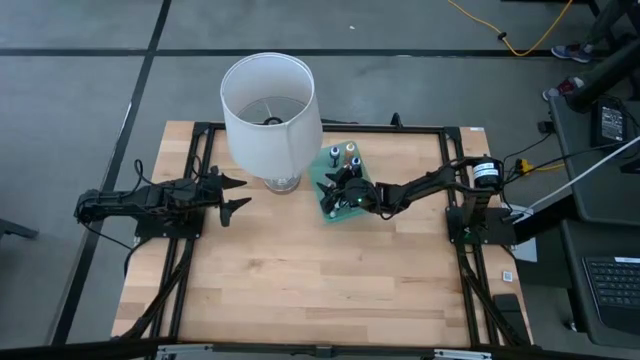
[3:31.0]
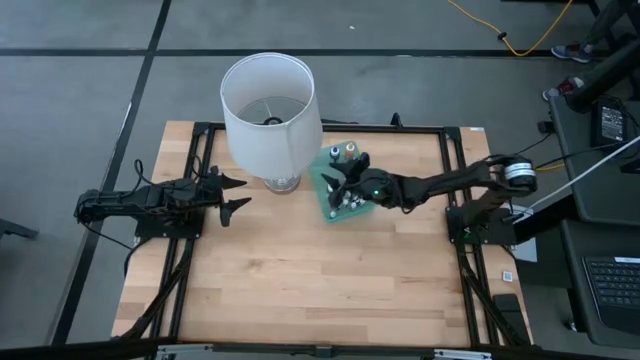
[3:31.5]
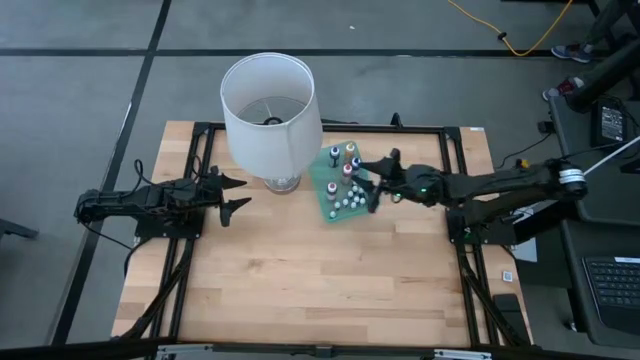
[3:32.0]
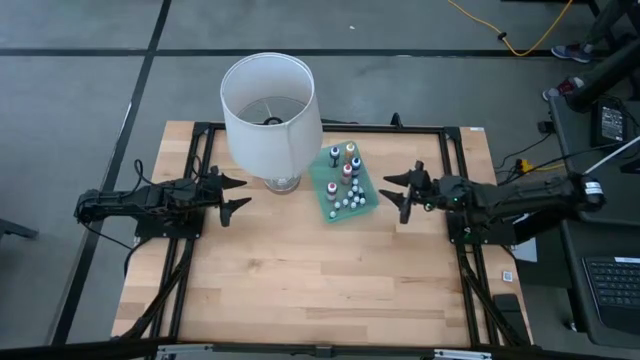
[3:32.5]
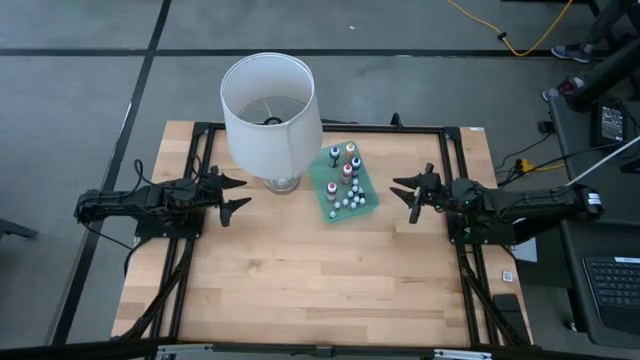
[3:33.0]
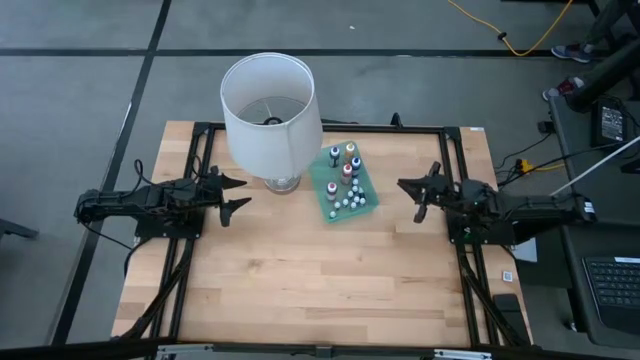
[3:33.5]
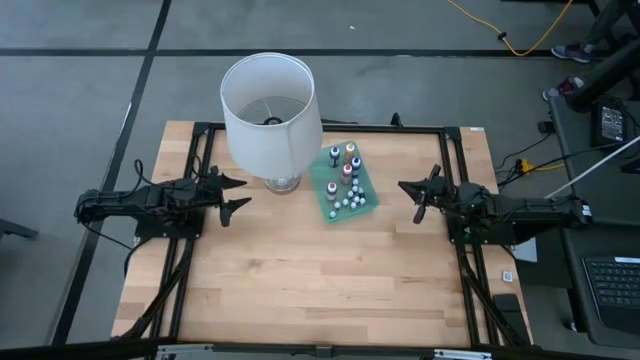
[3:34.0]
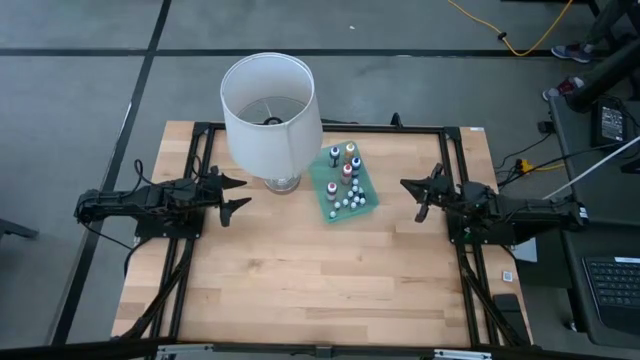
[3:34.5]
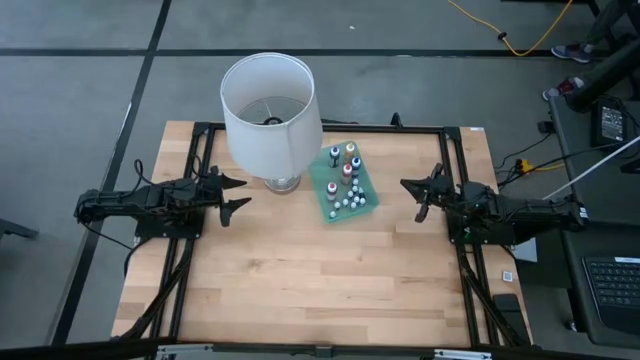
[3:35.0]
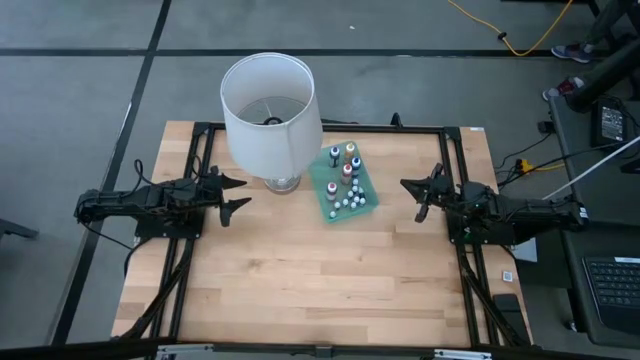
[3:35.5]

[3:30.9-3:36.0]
Task: Pick & Place food coloring
Return to Home Position

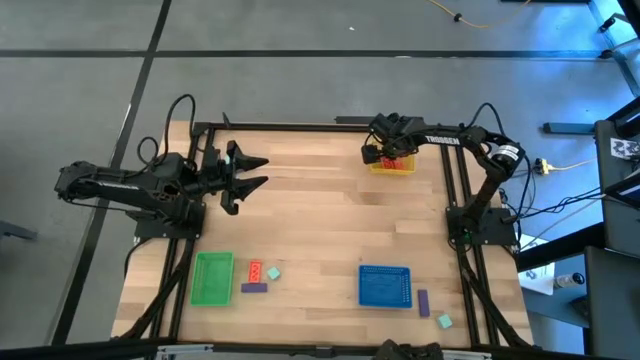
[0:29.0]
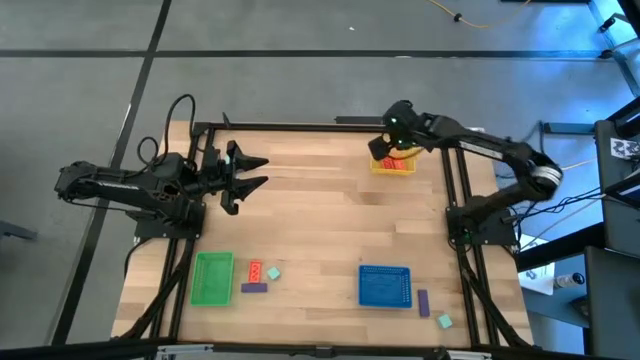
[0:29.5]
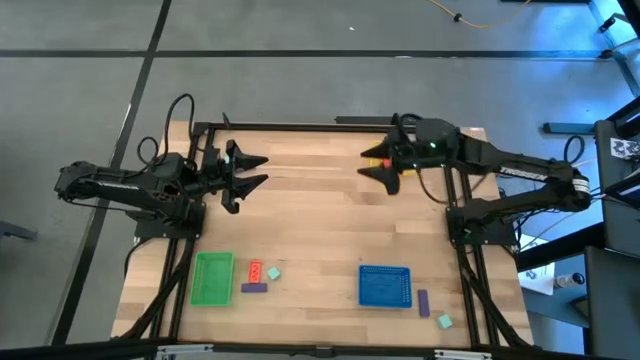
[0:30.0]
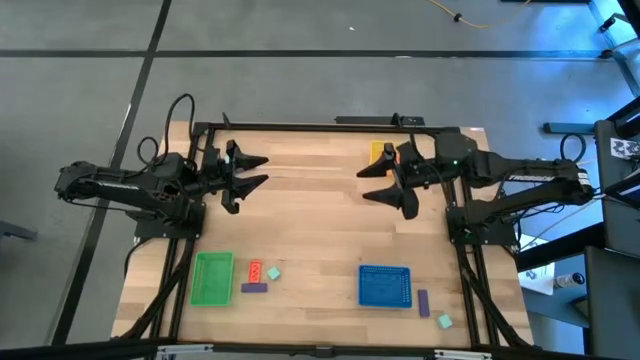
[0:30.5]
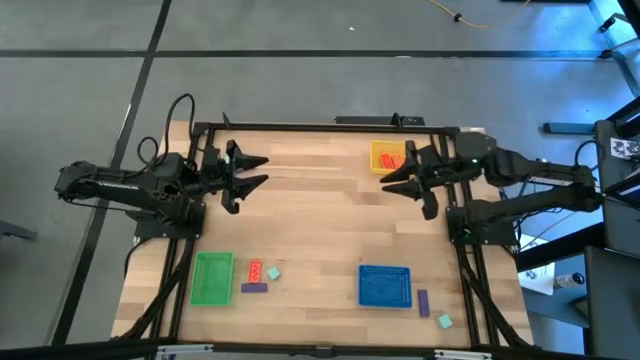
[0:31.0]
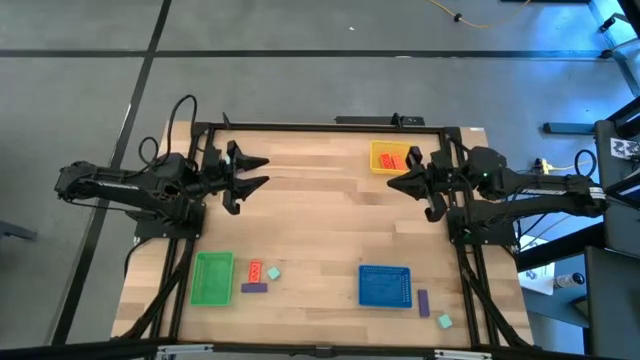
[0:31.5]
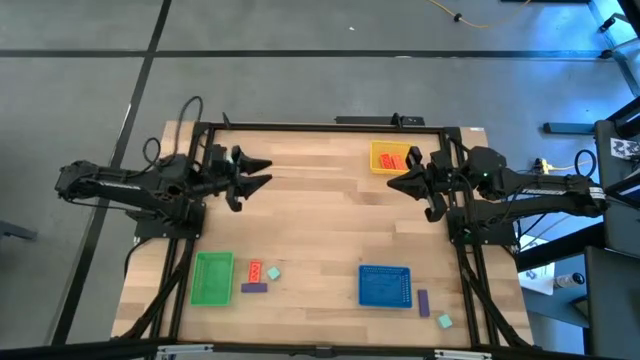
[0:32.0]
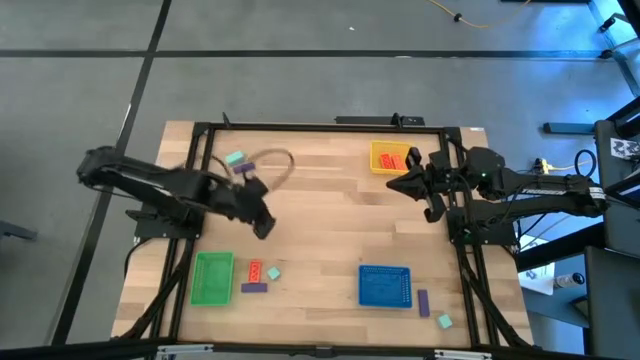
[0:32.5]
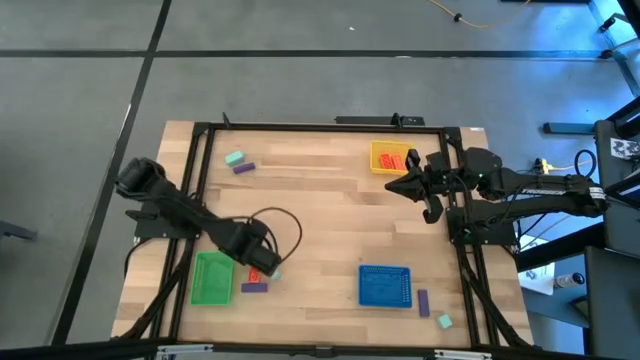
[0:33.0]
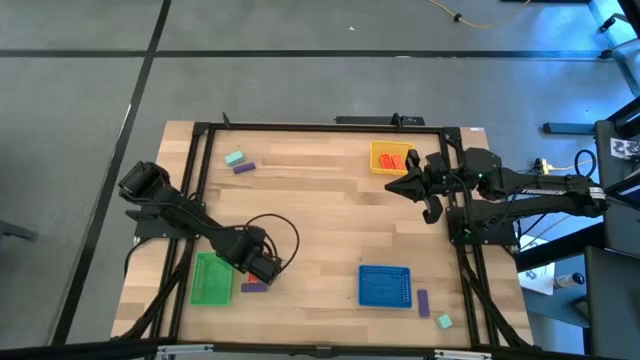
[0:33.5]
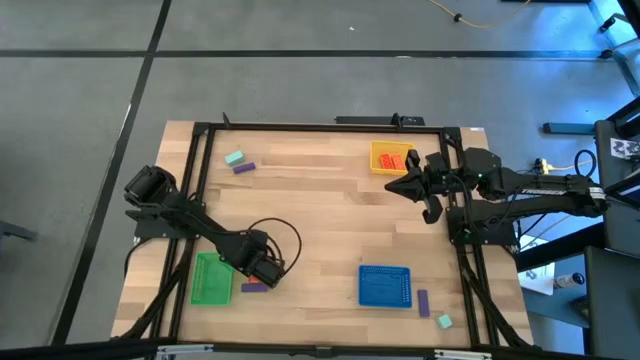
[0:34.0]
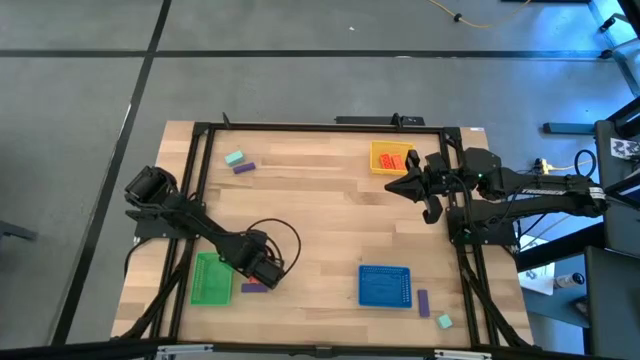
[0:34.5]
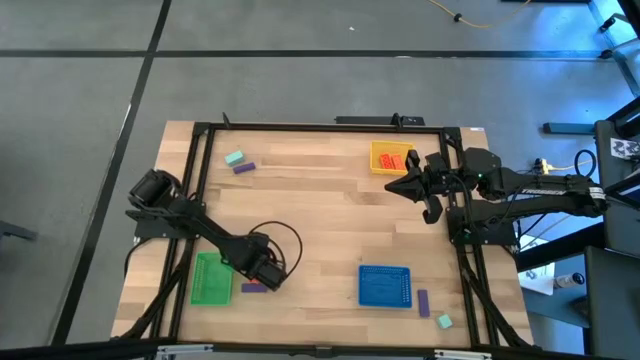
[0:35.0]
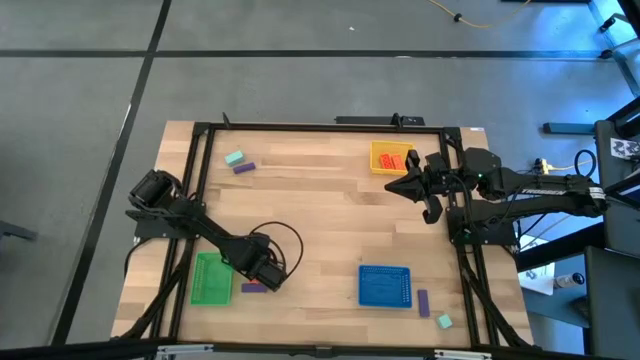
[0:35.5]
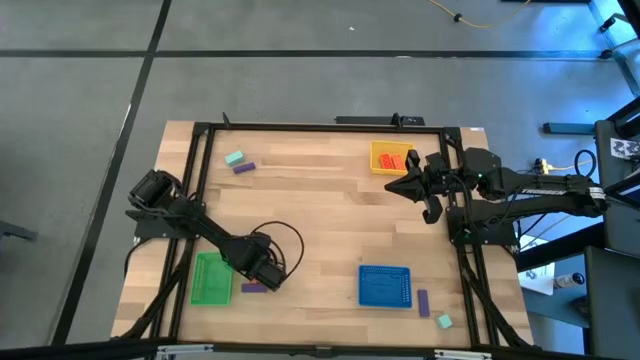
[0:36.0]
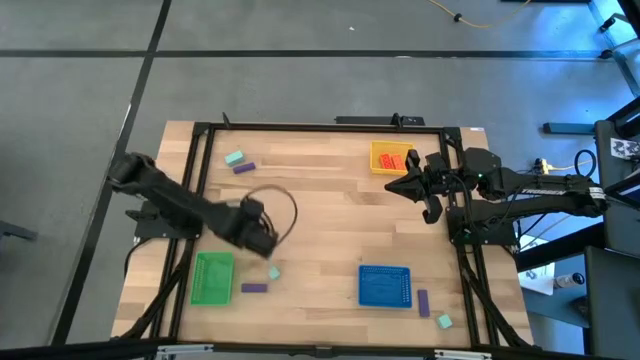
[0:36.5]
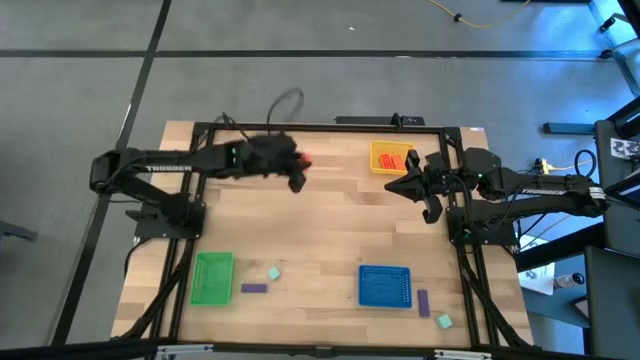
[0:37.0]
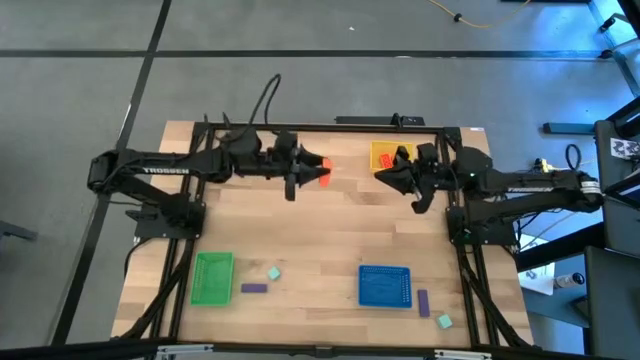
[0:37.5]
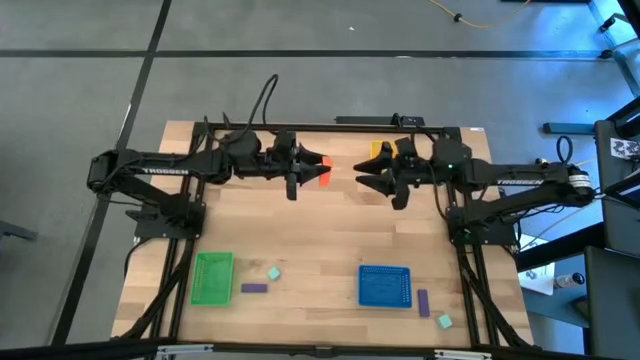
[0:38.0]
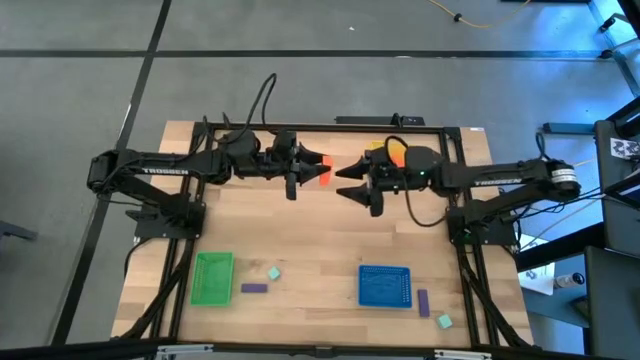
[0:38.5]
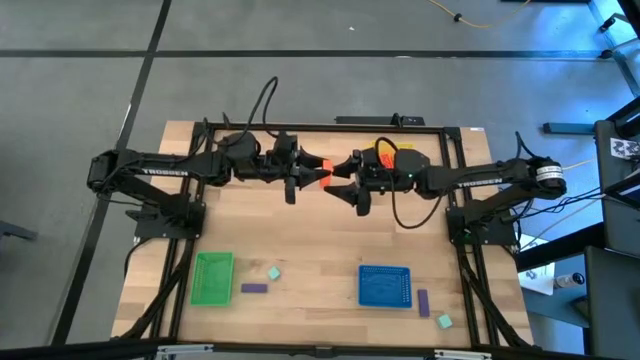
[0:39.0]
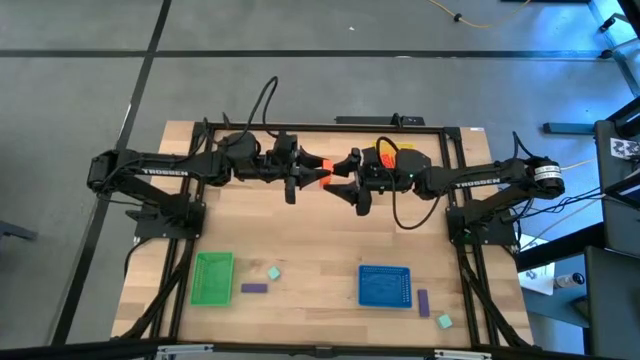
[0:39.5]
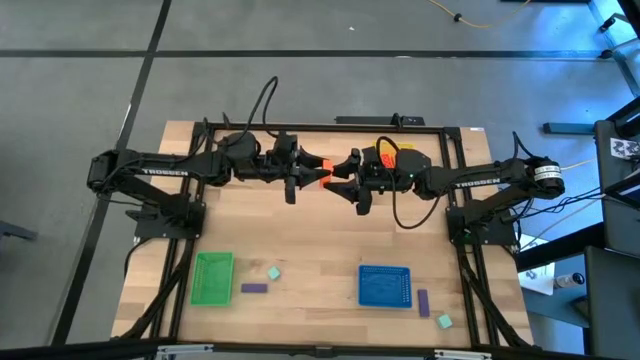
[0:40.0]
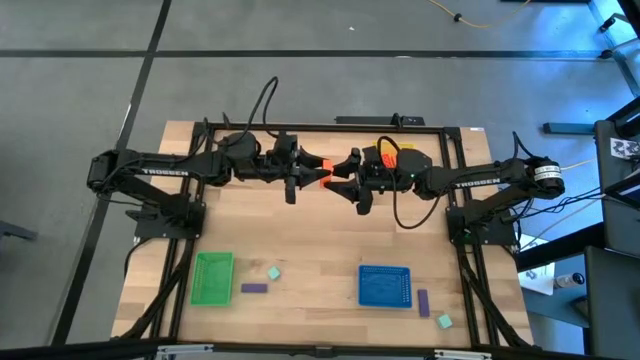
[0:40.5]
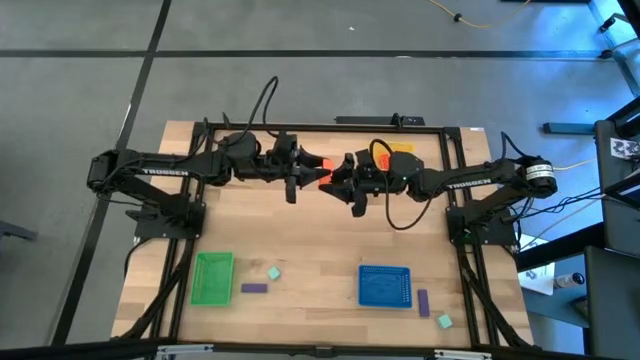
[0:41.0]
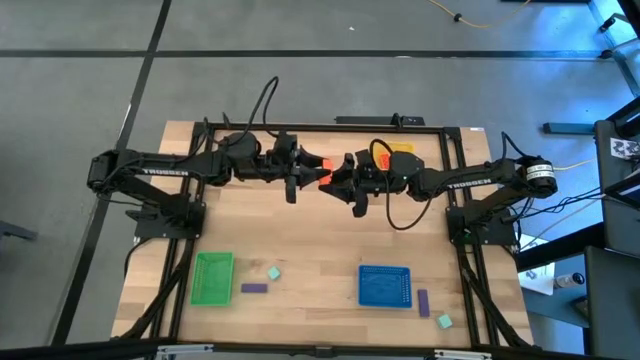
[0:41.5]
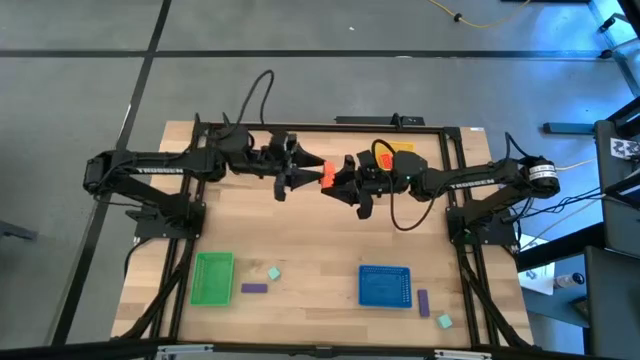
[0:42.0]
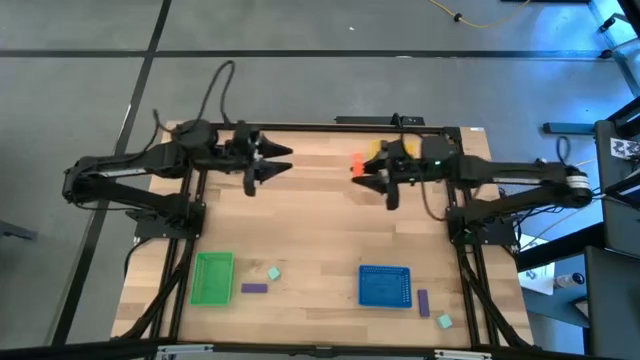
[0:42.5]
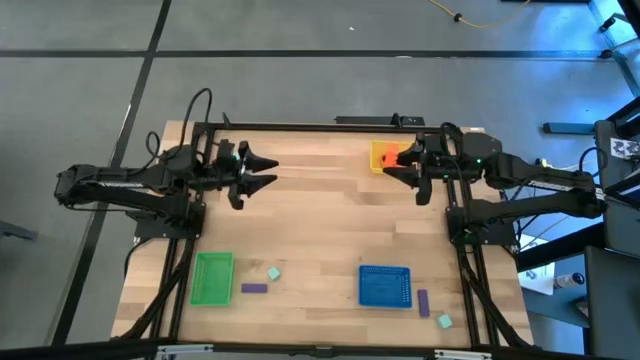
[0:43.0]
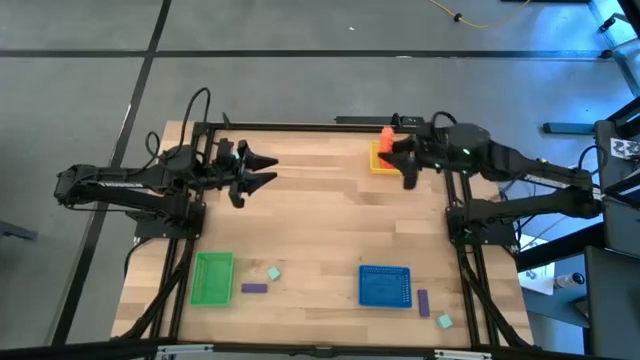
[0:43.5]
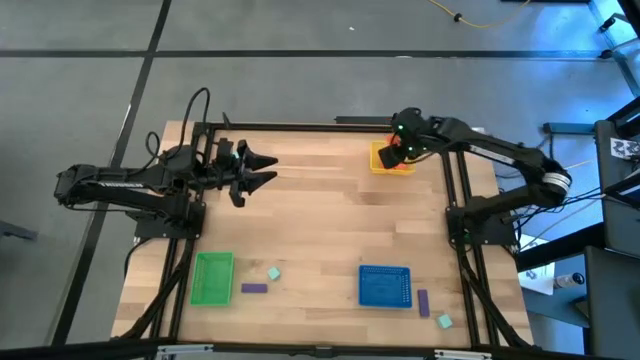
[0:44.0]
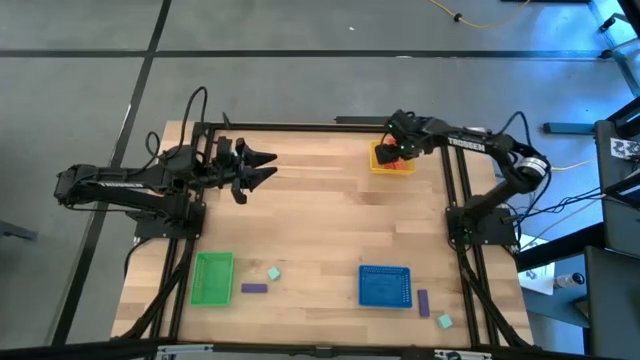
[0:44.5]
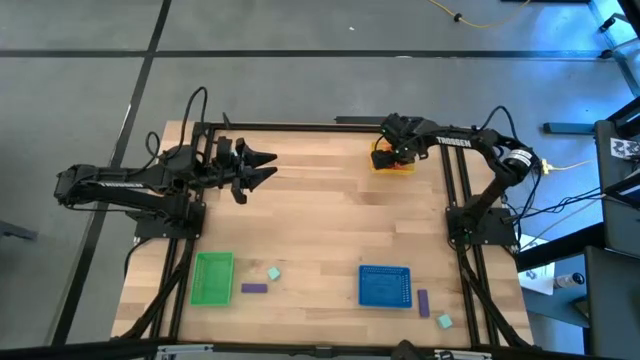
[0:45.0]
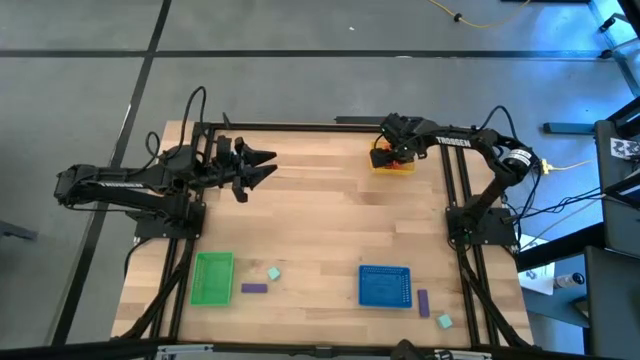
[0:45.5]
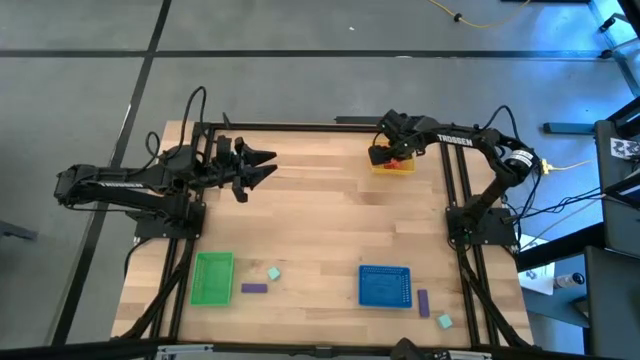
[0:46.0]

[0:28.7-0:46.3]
Task: Sort & place blocks by color
Put the orange gamepiece into the yellow bin
